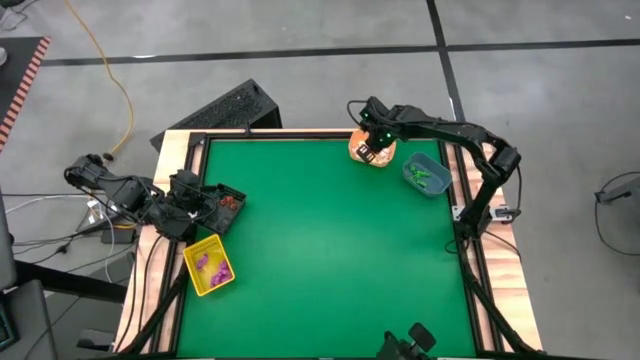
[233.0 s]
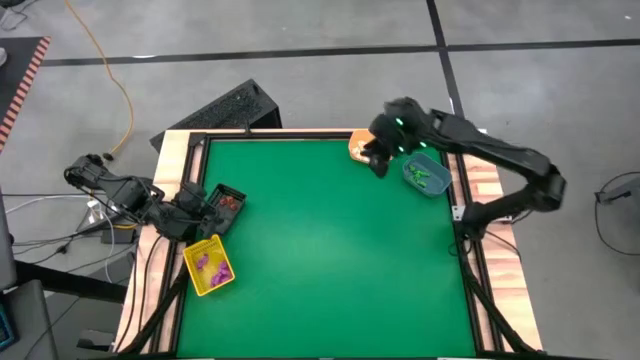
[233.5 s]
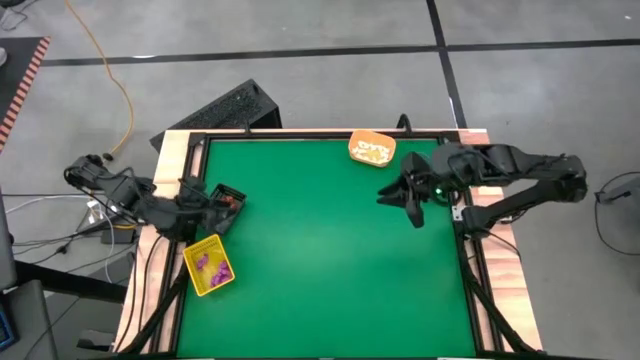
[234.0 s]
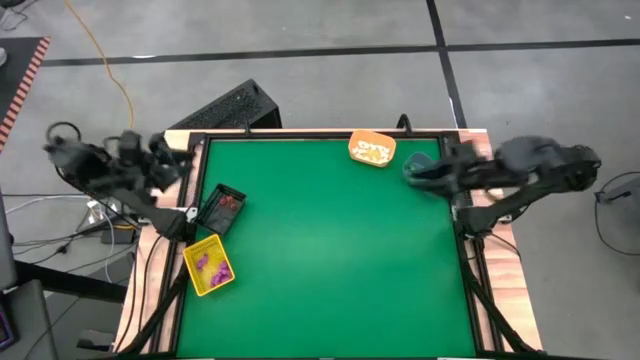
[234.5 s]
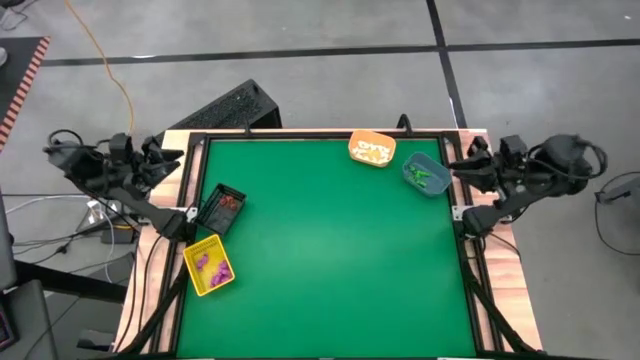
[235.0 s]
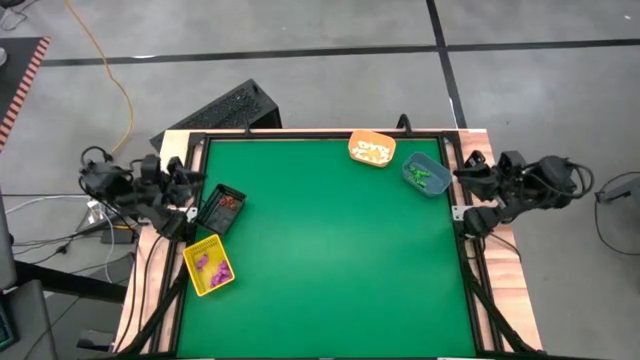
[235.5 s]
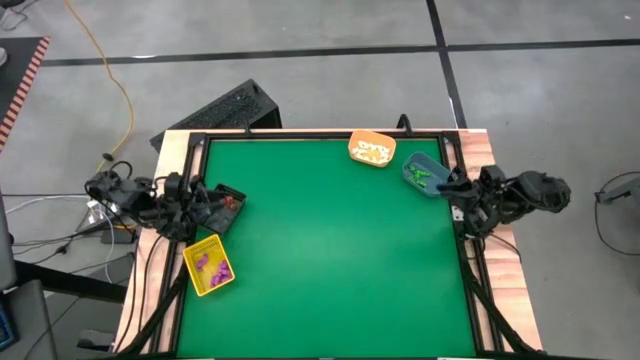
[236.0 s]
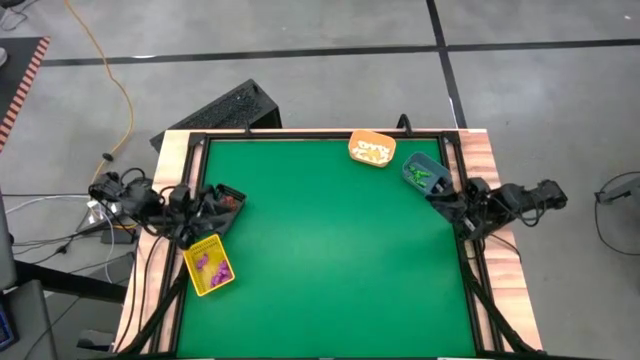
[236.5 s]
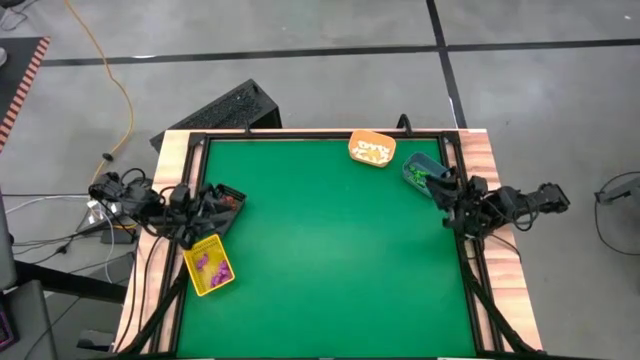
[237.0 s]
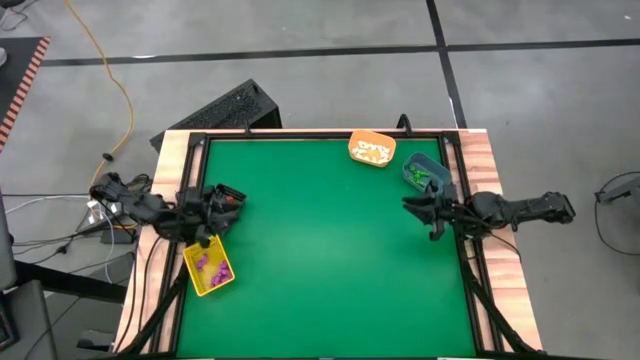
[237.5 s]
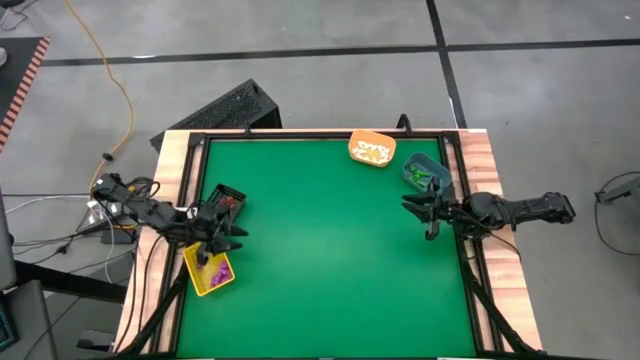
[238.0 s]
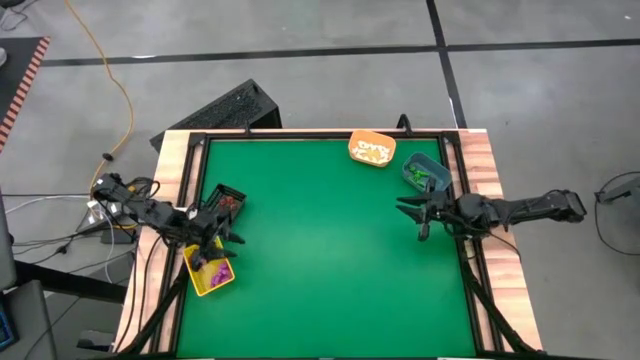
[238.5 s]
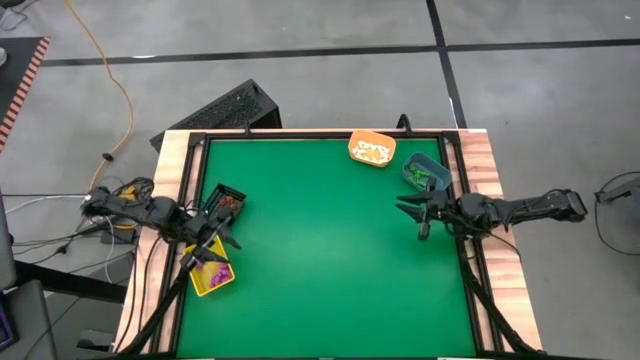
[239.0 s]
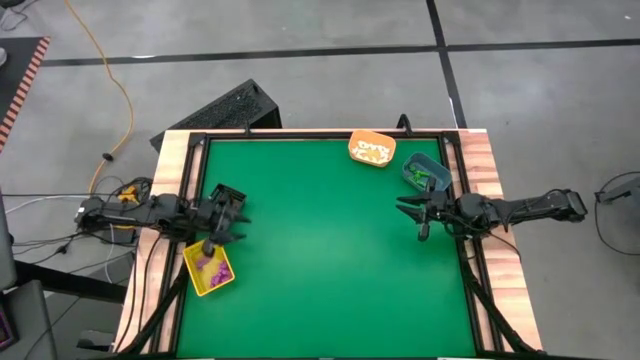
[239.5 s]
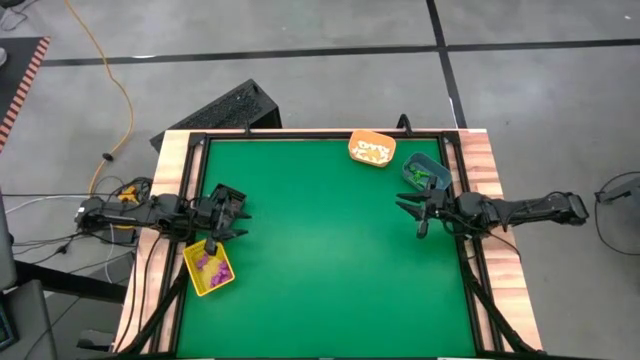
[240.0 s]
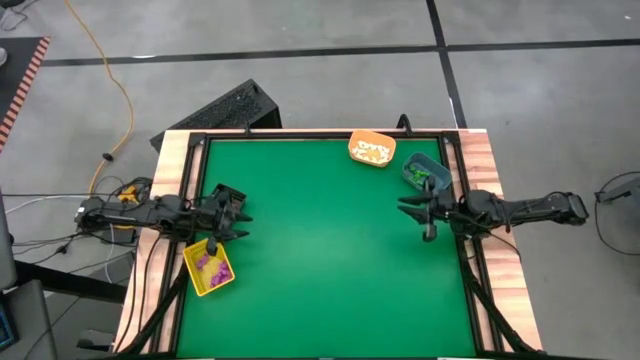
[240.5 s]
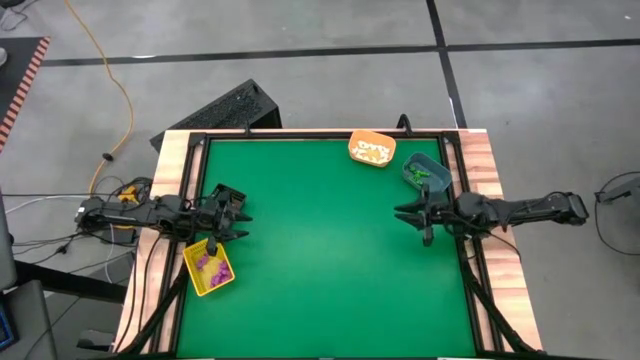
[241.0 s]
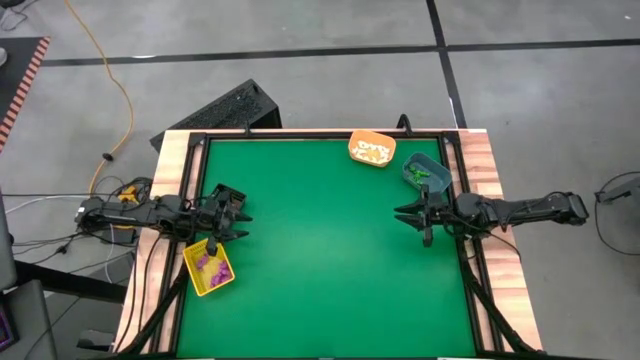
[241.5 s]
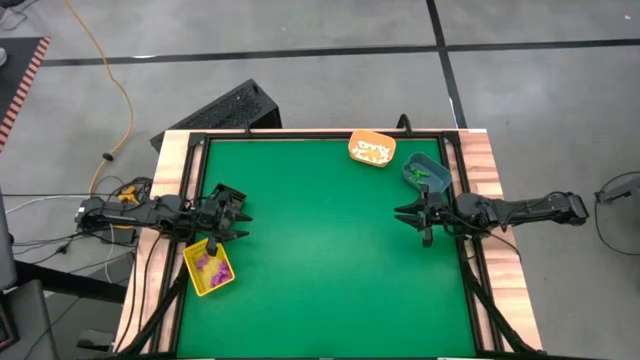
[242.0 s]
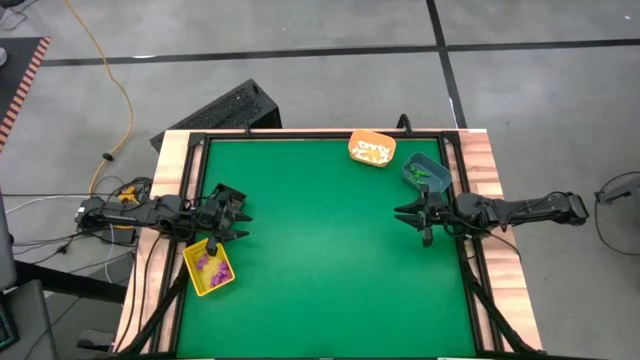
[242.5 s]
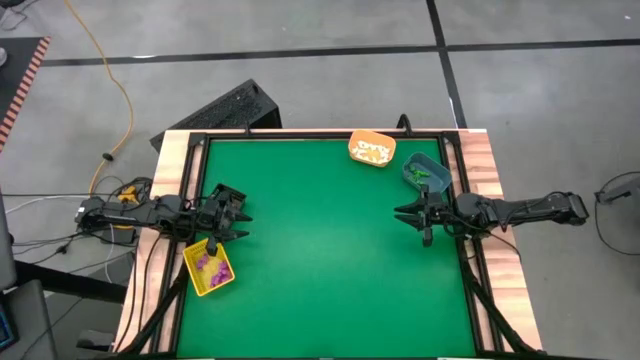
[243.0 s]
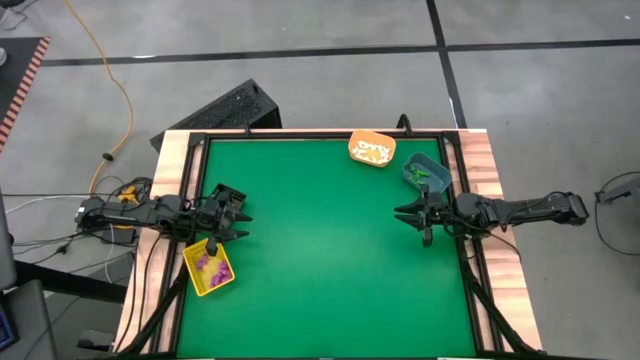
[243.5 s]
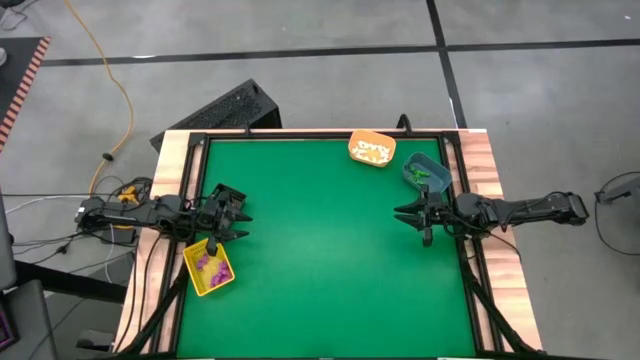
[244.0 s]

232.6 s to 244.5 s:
Task: Sort Halloween decoration
Return to Home Position

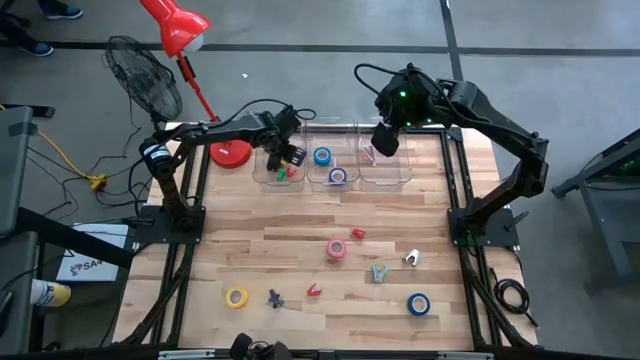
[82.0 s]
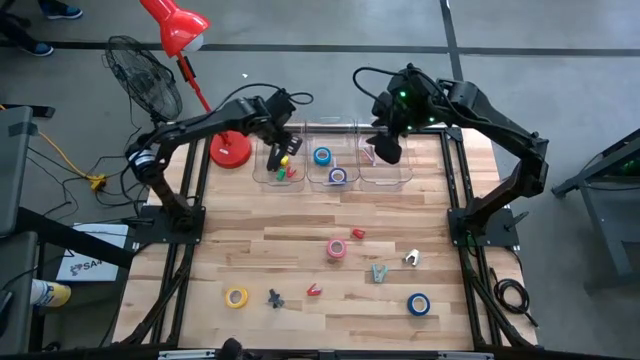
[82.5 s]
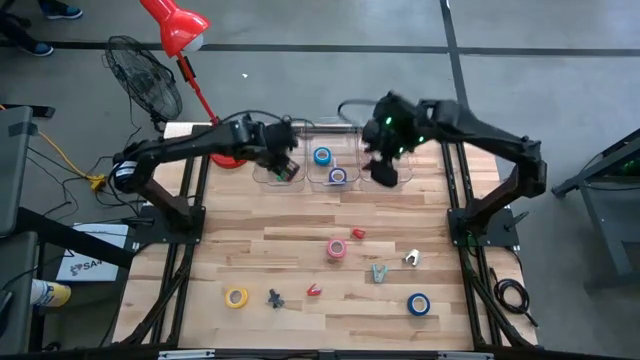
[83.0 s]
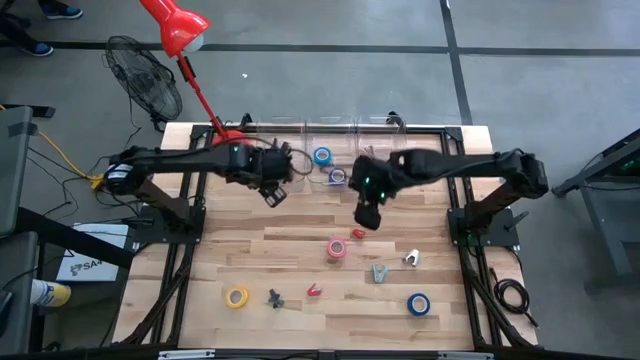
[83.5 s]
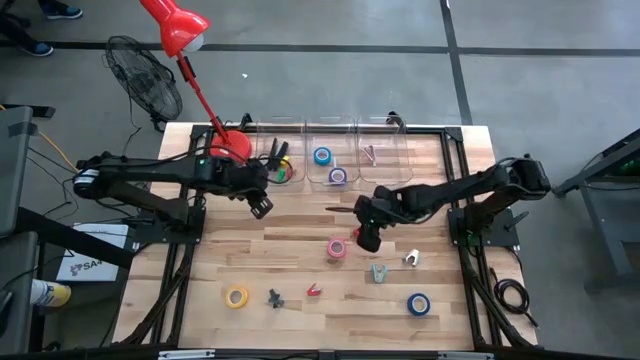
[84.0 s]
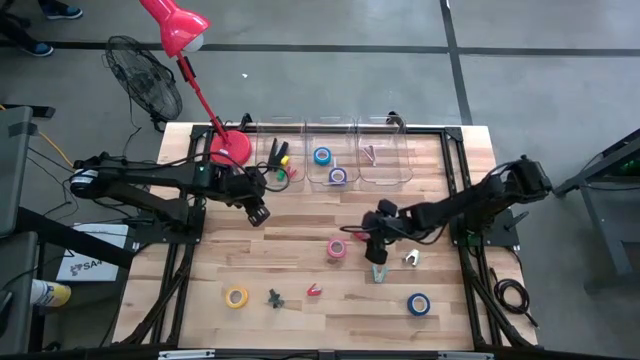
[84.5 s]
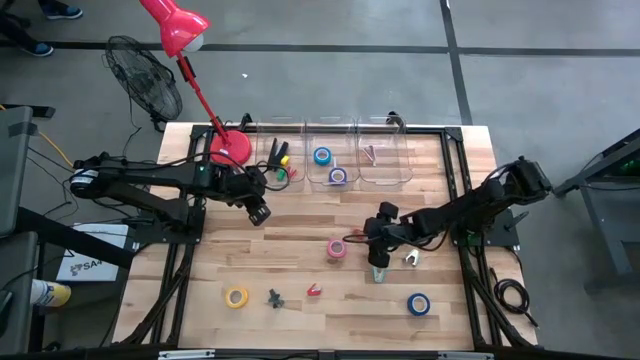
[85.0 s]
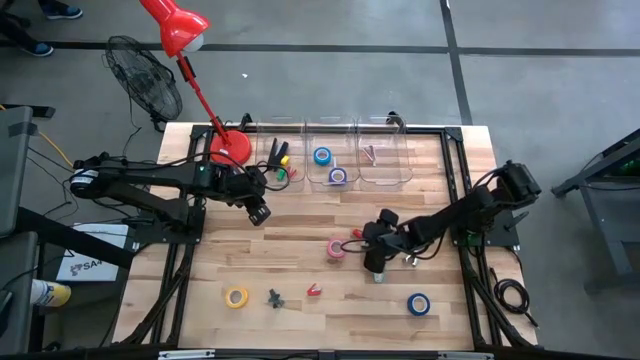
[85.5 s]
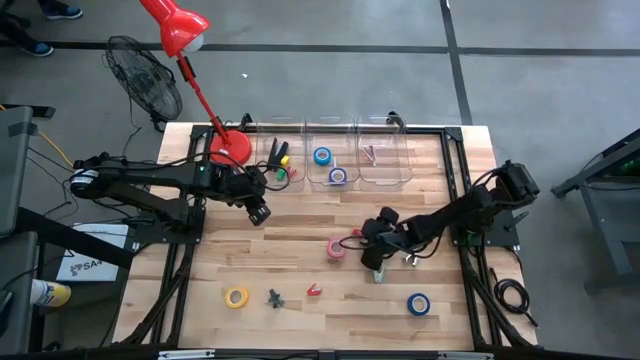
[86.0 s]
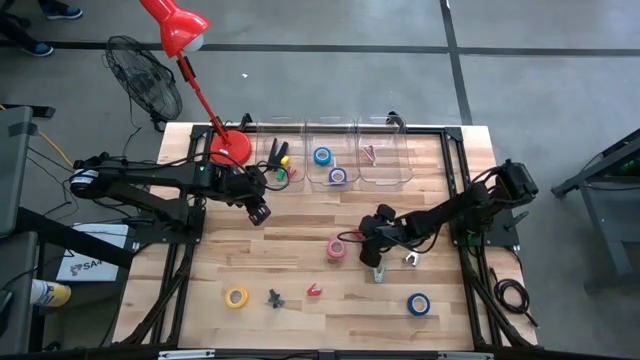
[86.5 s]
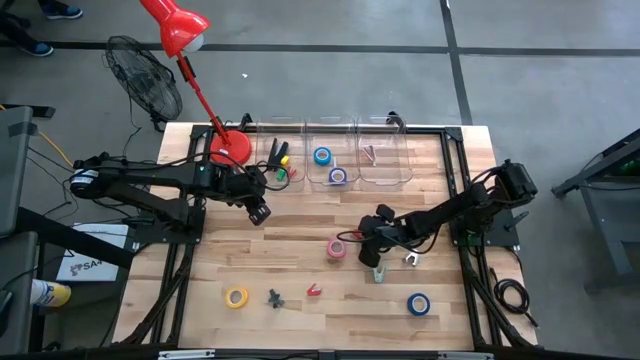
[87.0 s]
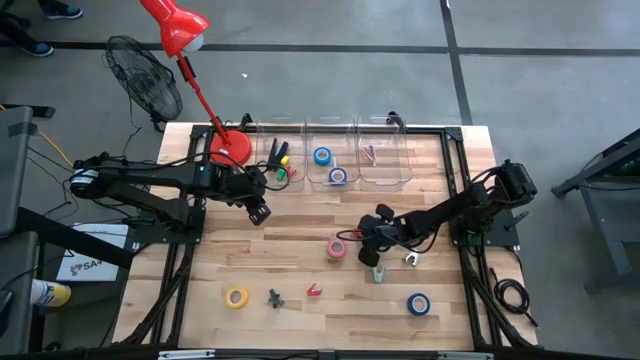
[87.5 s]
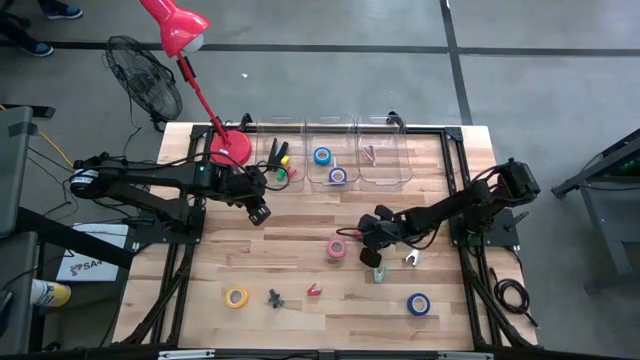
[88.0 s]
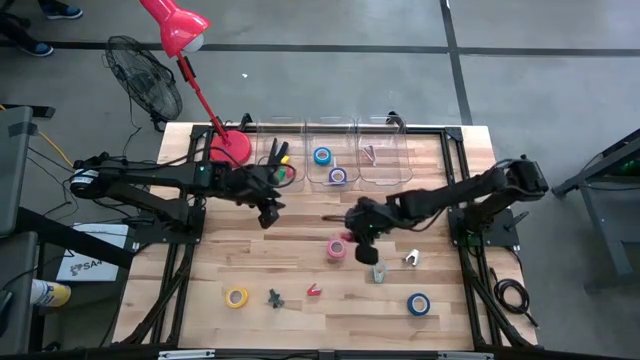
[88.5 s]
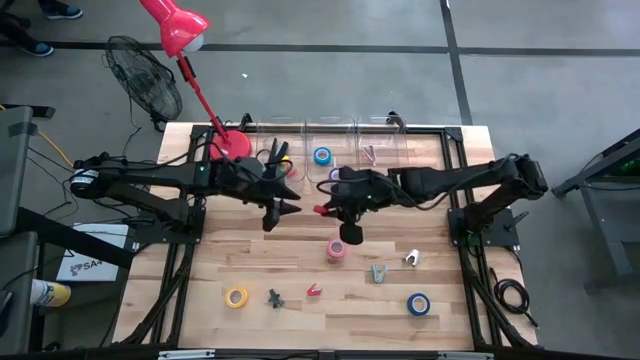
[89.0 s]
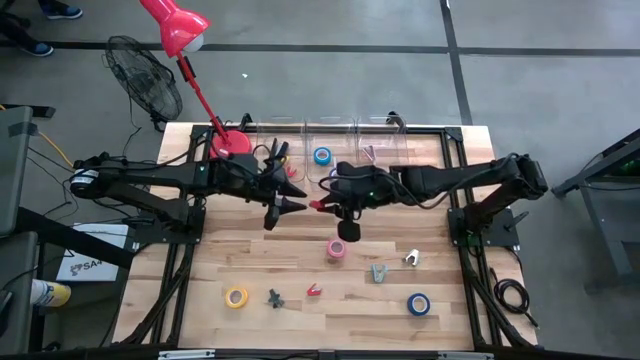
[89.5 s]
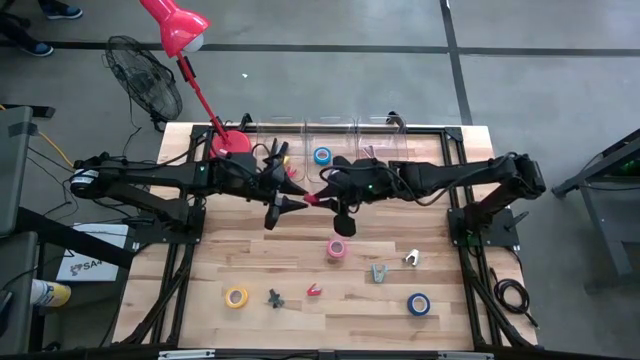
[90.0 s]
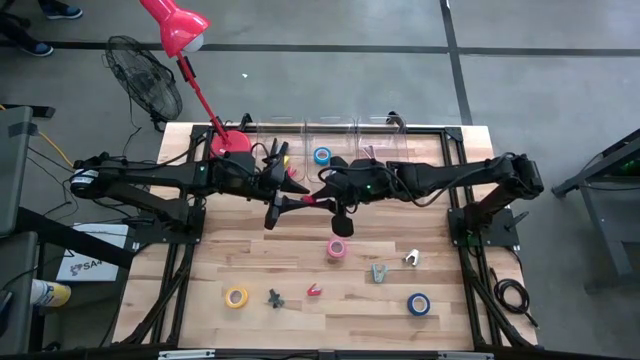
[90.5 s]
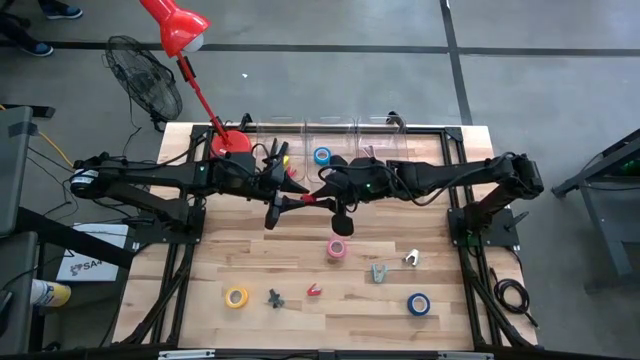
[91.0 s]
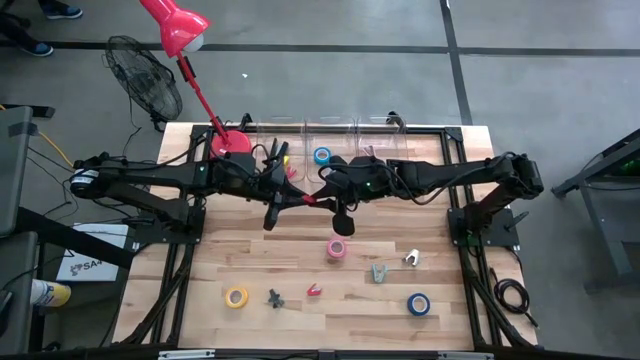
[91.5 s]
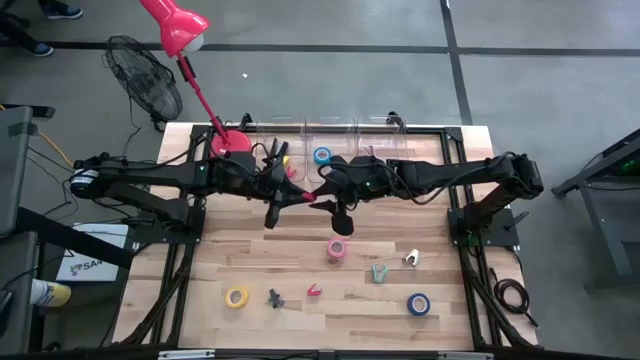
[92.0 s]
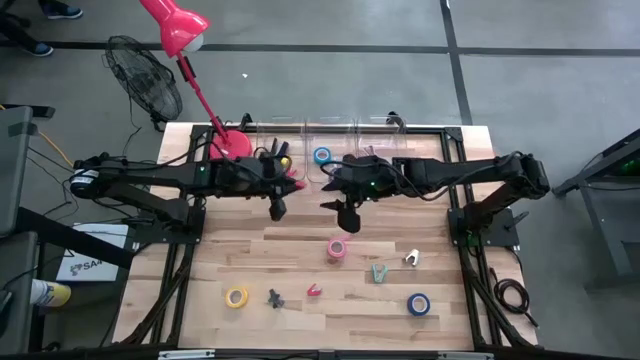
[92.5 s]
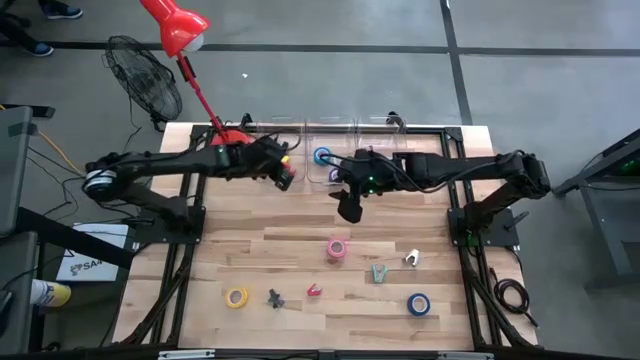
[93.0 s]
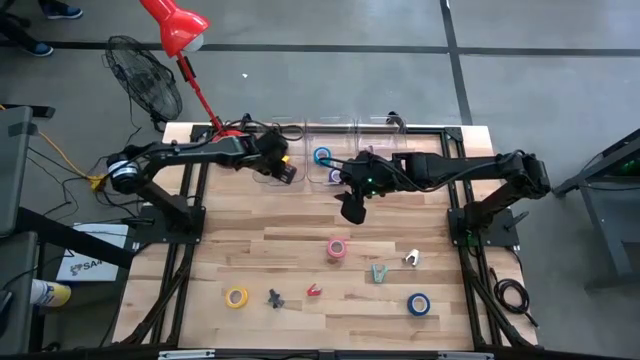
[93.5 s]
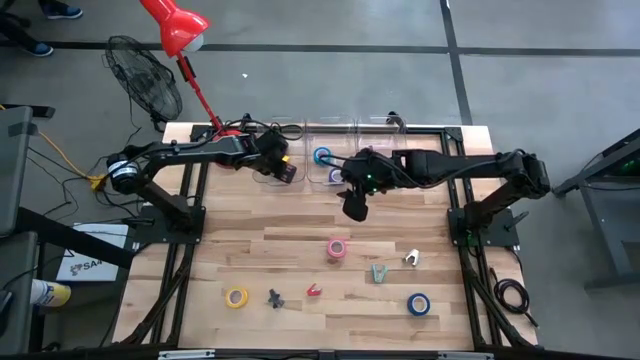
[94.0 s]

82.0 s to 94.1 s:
Task: Pick and place Stapler, Stapler remover, tape
Put the right red stapler into the left transparent bin
